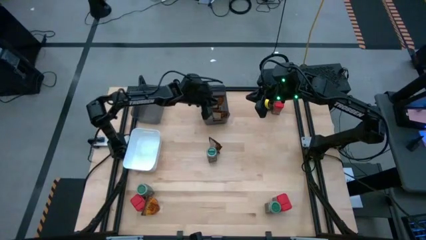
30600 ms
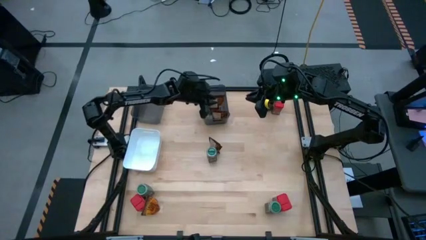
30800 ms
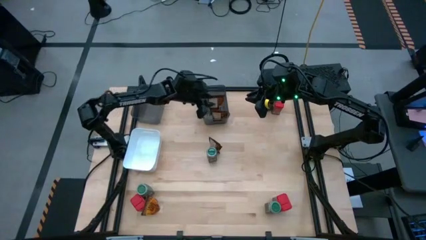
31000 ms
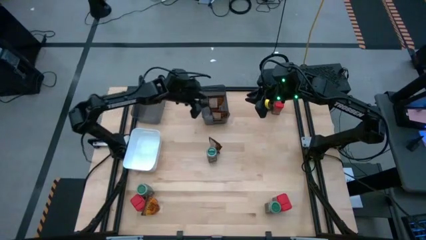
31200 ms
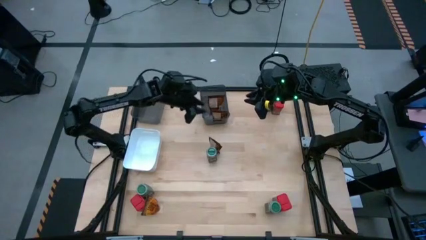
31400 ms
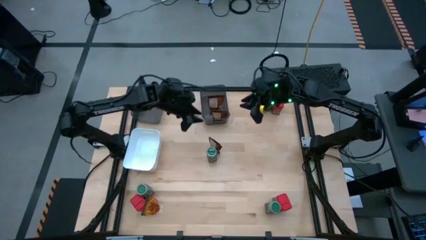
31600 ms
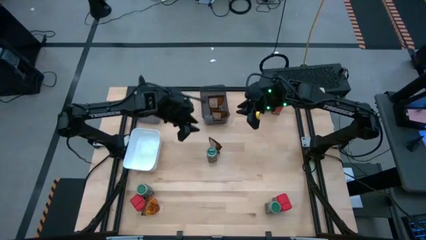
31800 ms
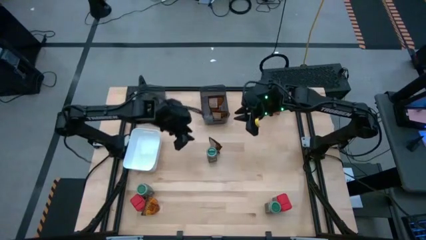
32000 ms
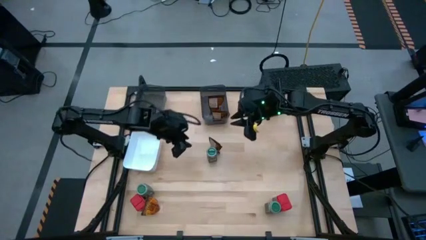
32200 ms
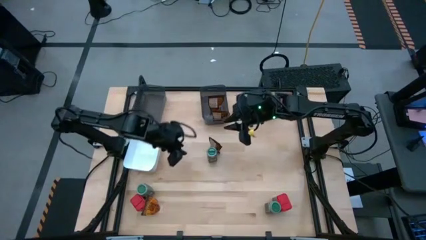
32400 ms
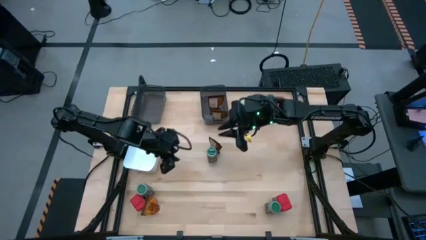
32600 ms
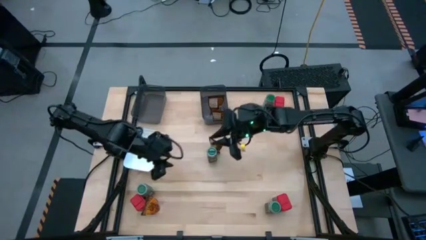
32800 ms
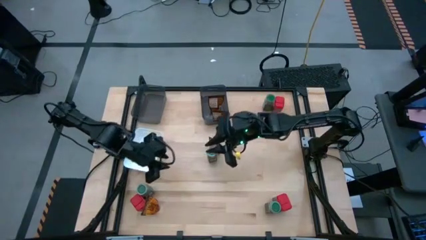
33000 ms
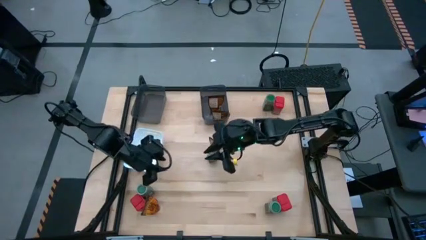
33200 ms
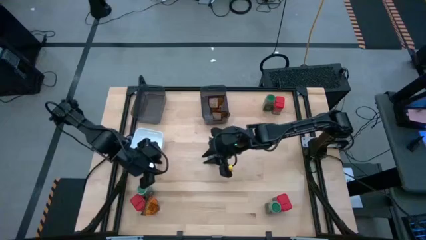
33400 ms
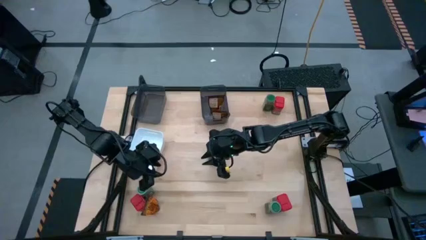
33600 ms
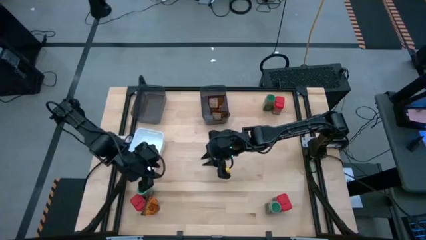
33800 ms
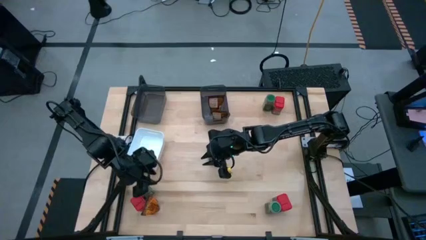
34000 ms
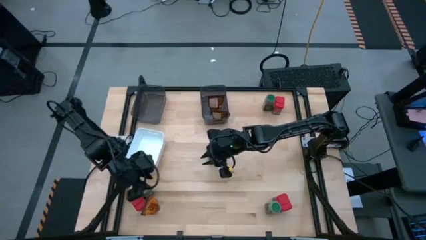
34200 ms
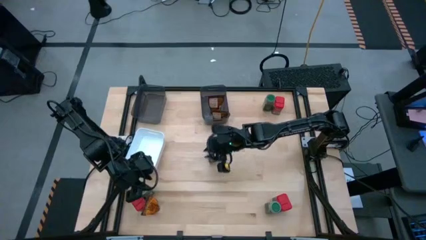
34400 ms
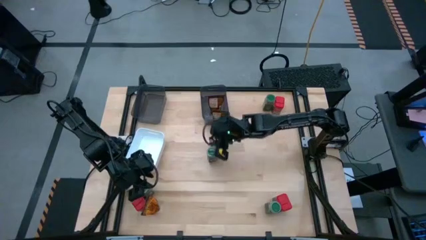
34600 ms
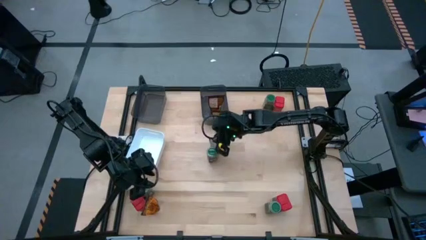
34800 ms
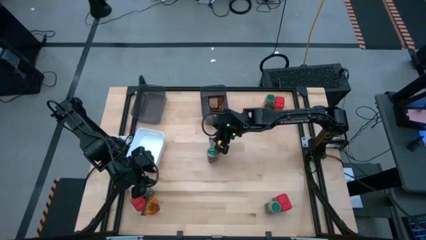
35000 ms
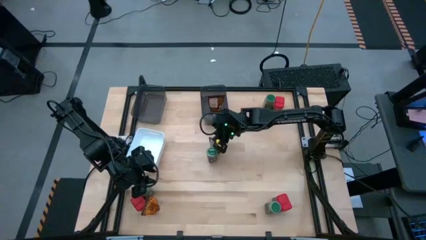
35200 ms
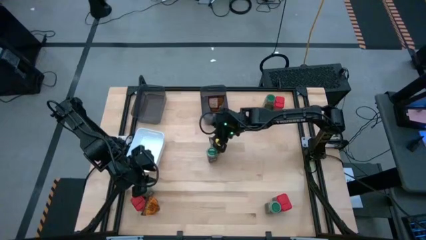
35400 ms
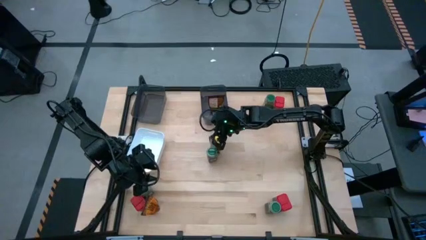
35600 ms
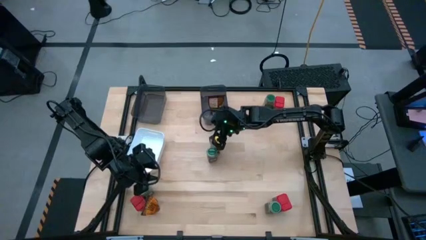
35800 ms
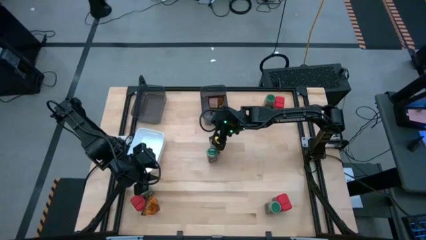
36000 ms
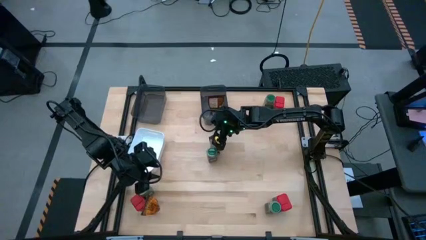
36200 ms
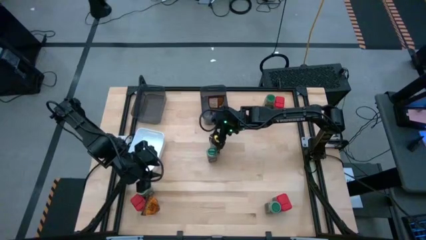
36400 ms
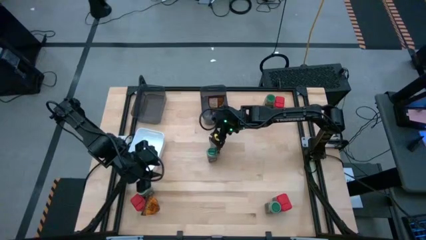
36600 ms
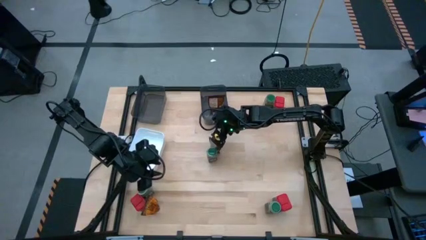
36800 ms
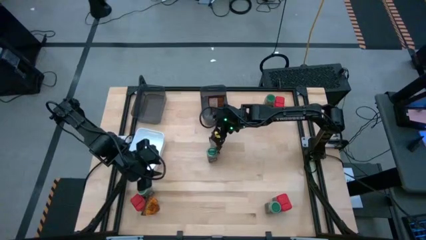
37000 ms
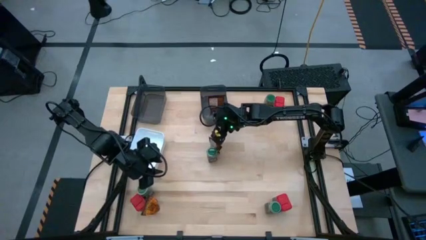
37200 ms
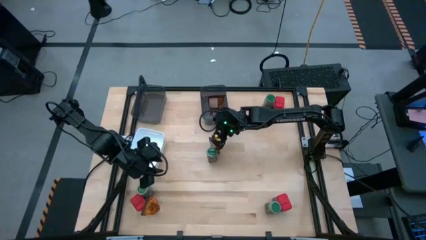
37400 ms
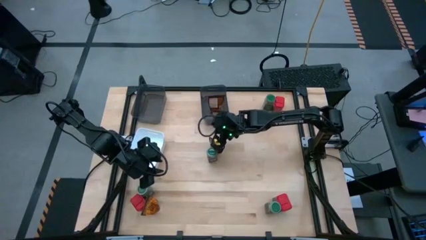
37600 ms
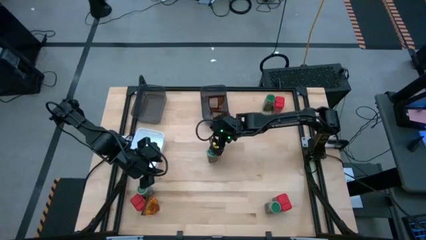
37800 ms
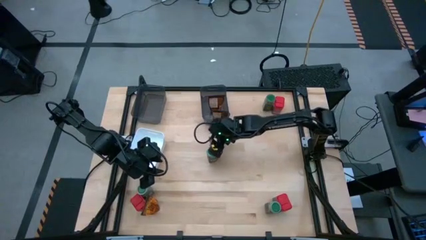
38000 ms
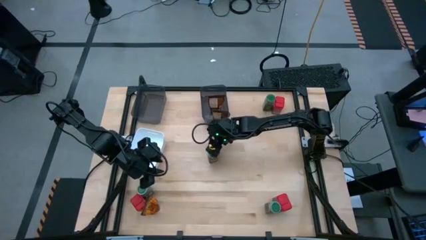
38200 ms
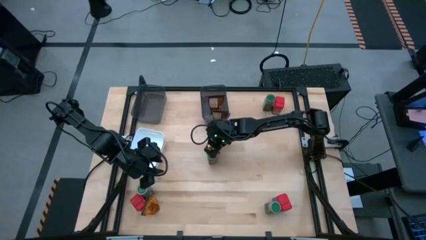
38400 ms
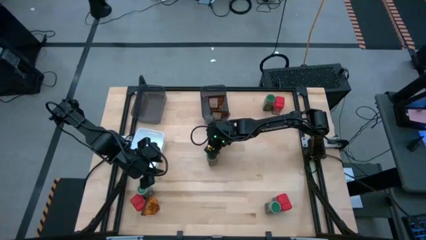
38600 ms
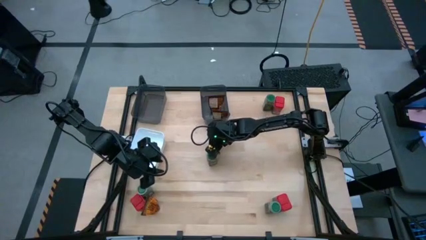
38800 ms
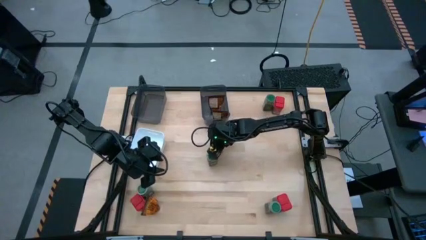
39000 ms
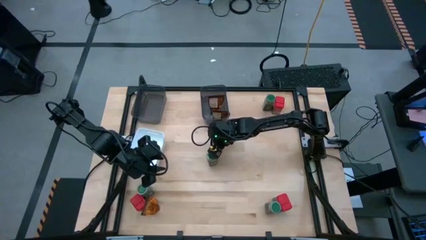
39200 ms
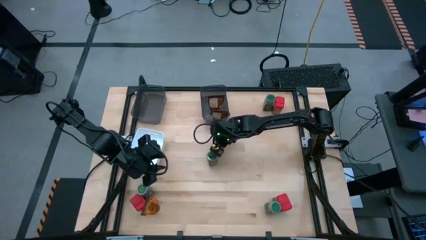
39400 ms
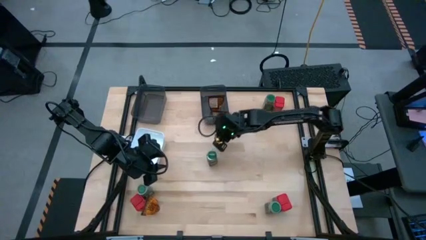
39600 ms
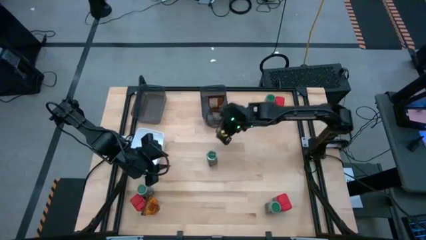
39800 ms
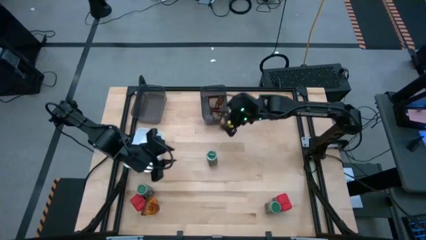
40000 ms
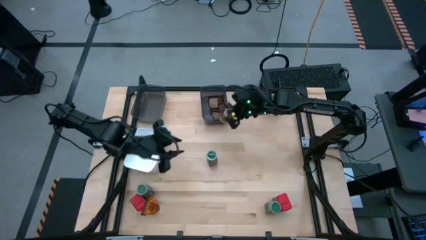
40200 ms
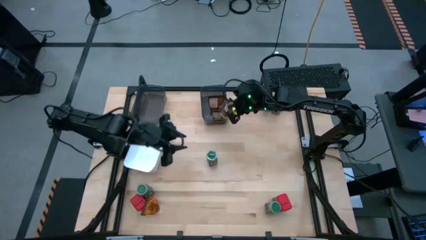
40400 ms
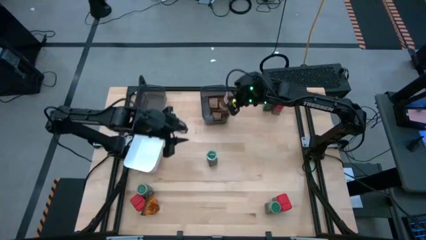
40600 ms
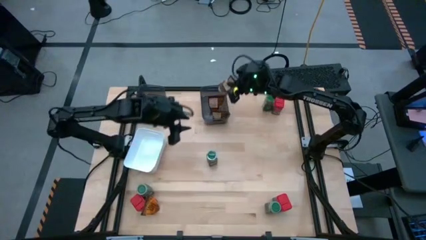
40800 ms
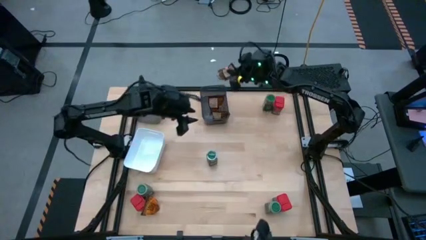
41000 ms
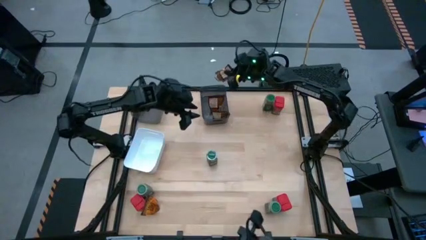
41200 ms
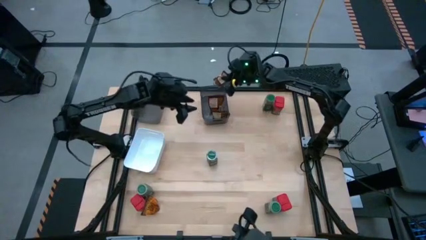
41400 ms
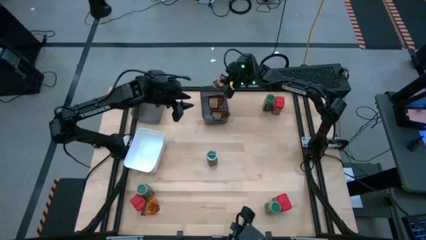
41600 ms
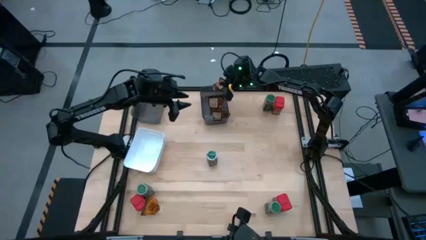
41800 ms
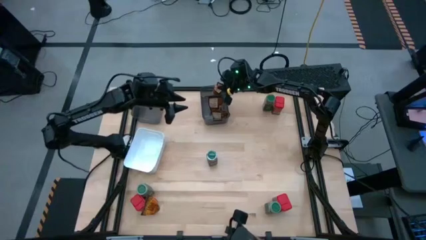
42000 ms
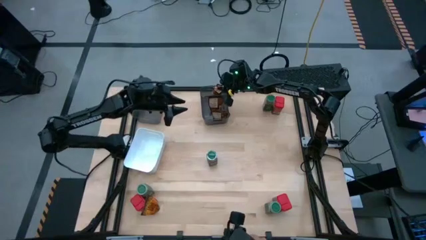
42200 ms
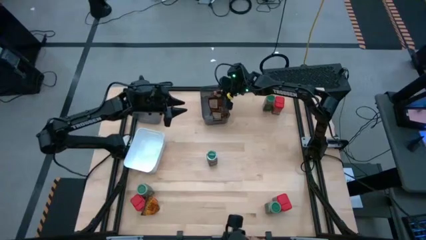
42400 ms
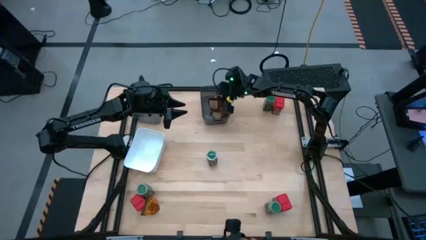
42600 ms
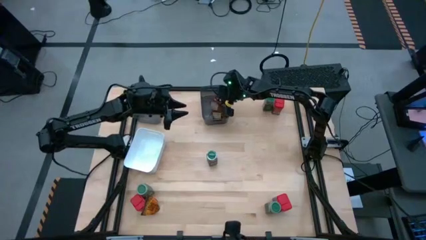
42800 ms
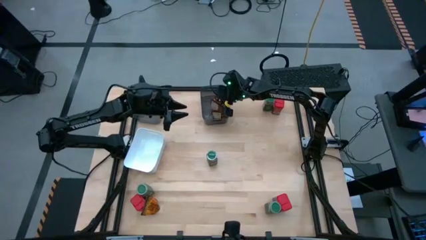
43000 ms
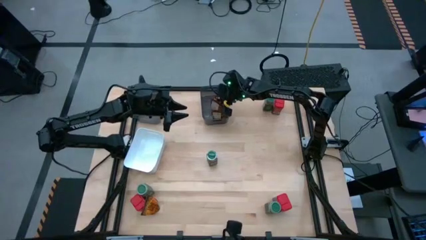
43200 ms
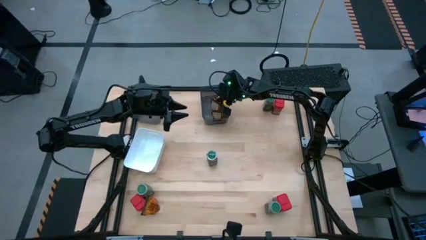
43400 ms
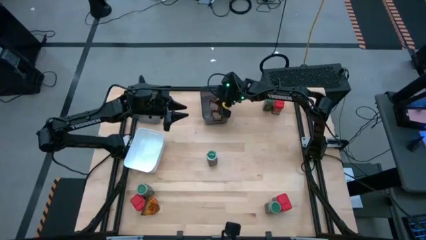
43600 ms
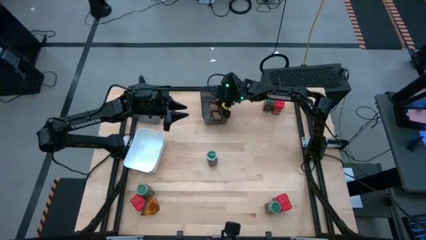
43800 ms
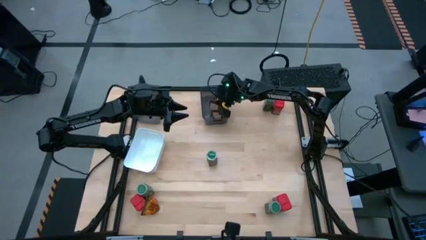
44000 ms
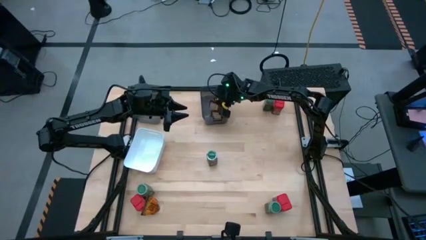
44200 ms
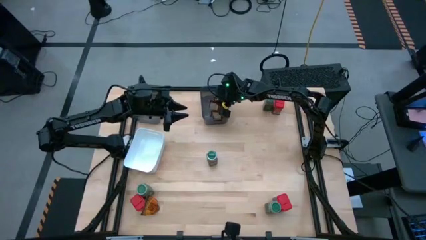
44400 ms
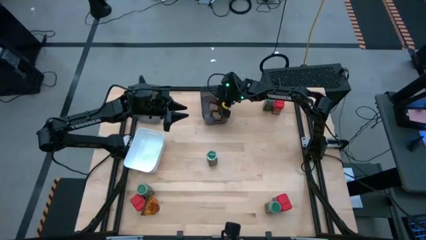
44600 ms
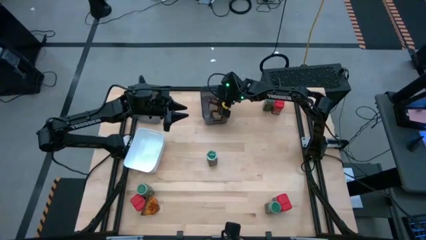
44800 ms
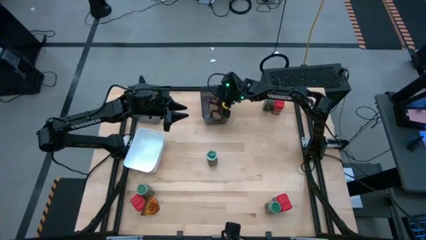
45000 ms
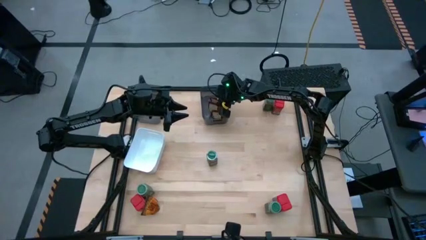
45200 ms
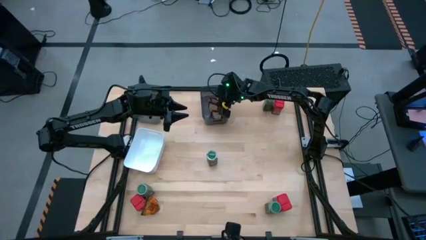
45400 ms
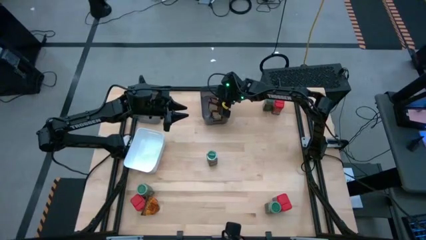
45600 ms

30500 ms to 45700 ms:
Task: Sort spices by type
Put the top brown seasoning bag into the middle black bin

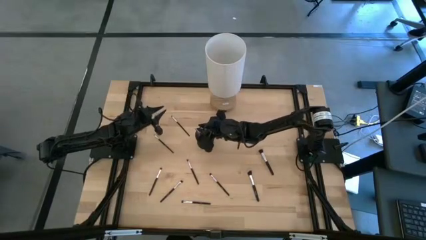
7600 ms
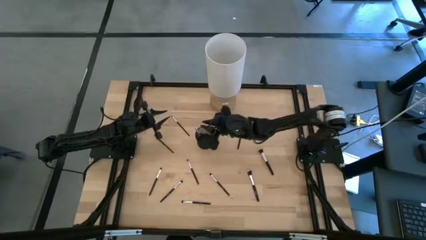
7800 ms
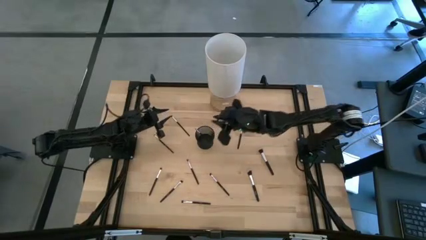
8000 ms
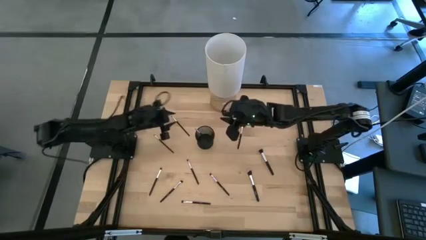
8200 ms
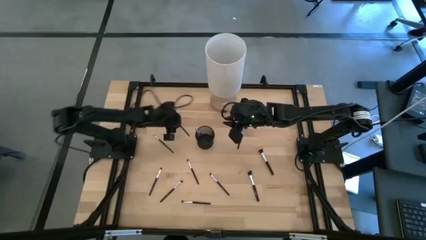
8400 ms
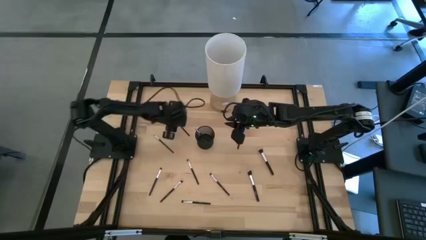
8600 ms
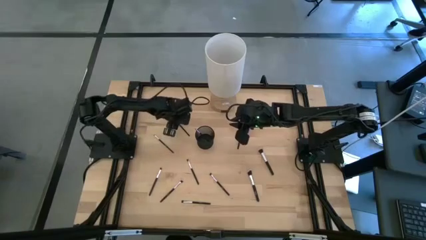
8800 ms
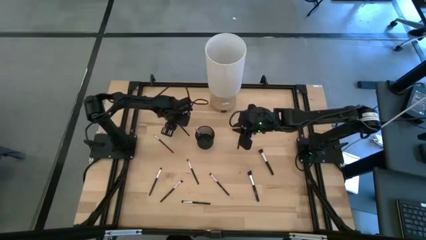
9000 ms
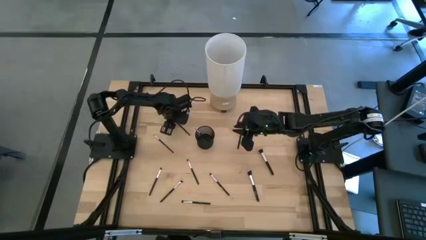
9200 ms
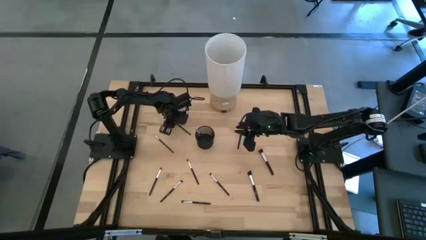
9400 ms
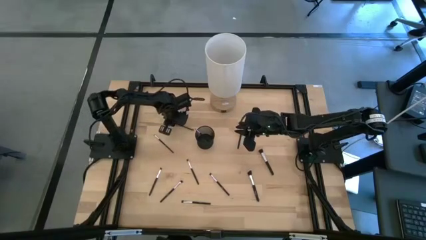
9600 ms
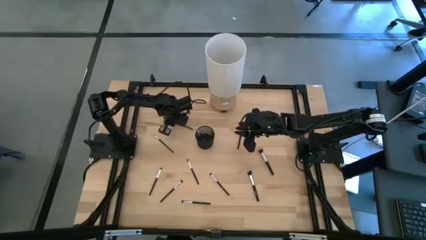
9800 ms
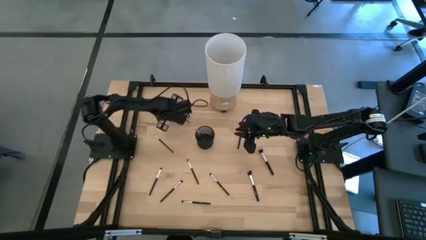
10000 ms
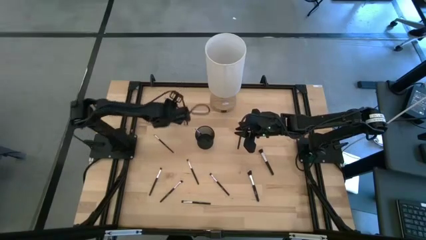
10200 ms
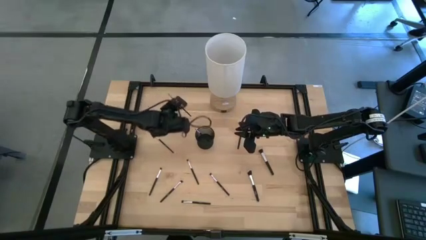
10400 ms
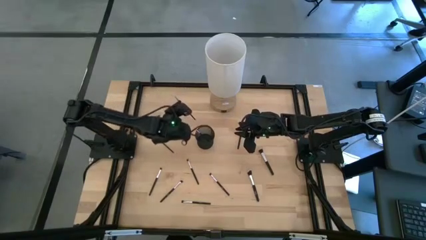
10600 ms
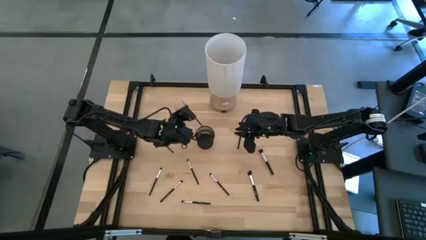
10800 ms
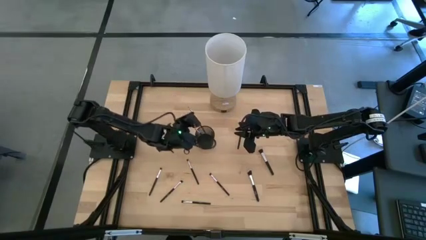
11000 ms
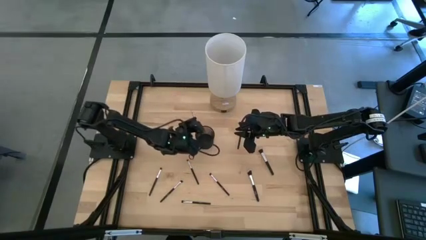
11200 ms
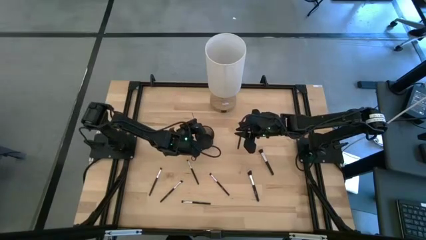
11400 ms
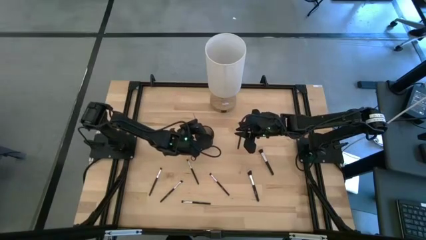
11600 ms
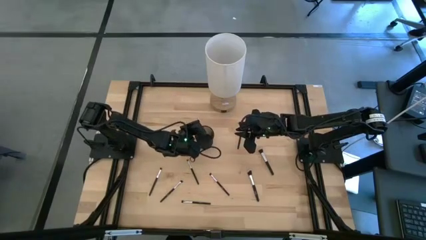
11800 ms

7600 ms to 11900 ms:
Task: Put items in baskets/containers
Put the eyeshadow brush into the holder
